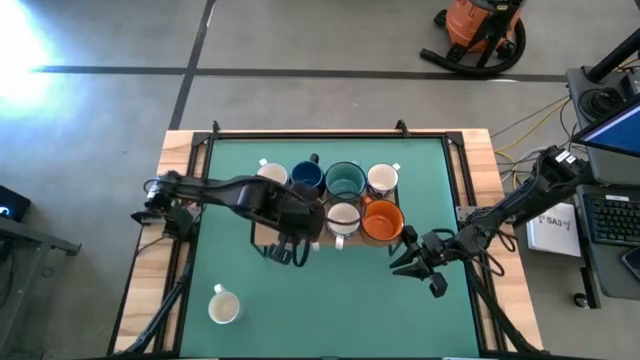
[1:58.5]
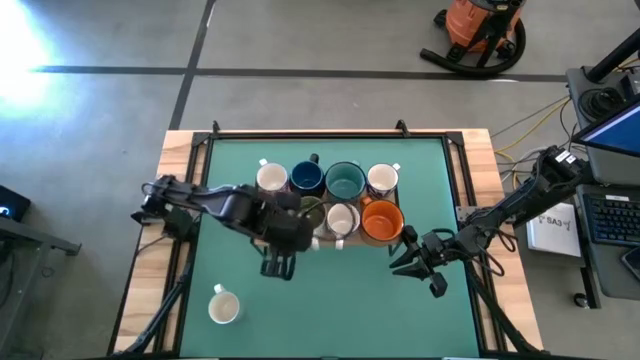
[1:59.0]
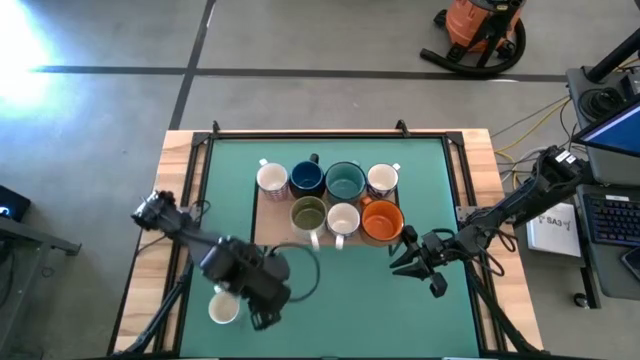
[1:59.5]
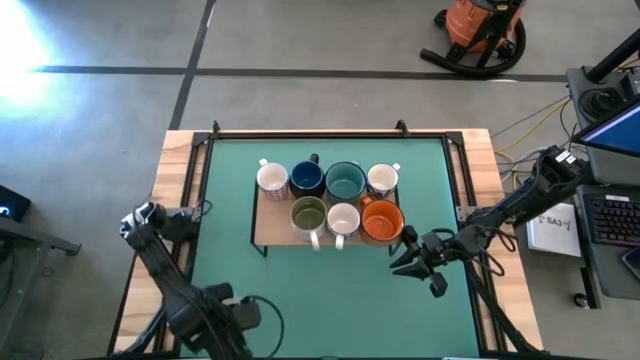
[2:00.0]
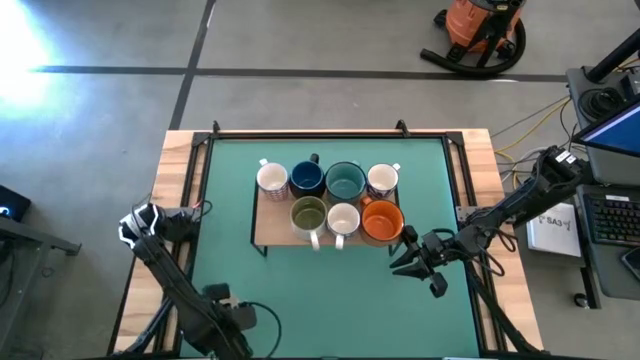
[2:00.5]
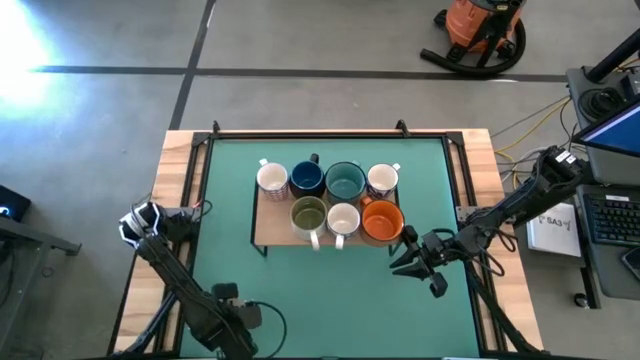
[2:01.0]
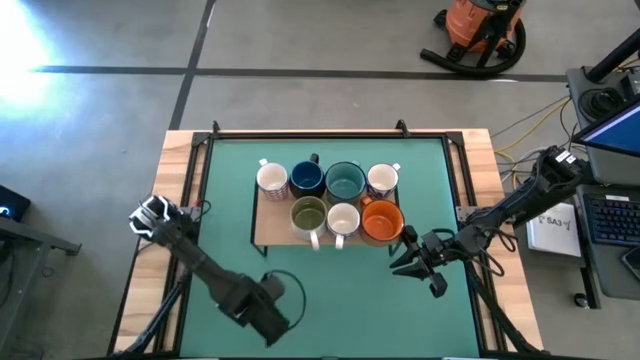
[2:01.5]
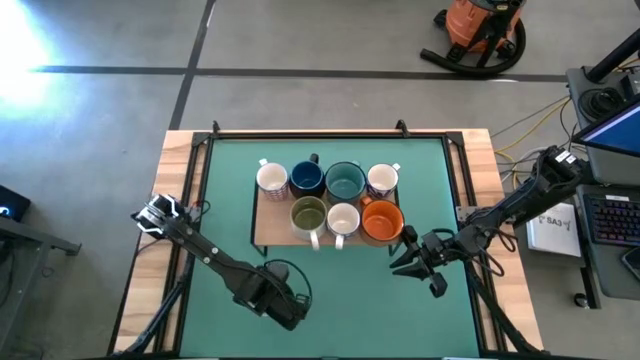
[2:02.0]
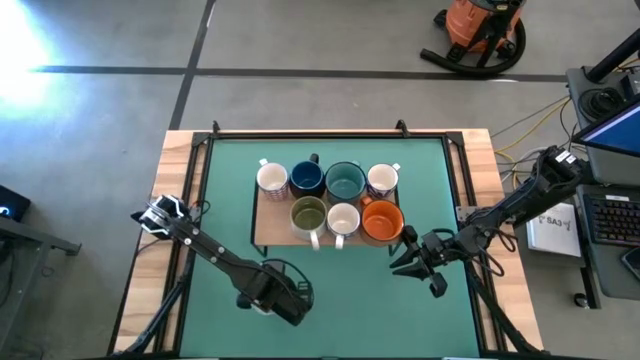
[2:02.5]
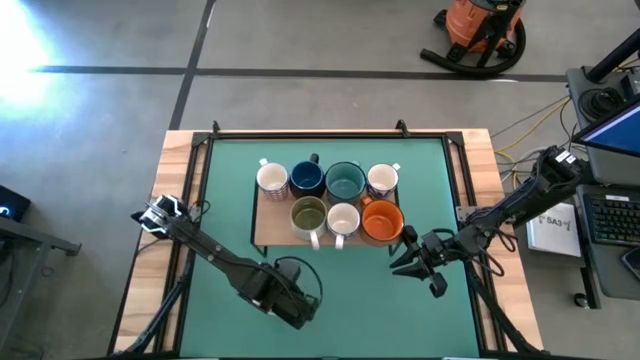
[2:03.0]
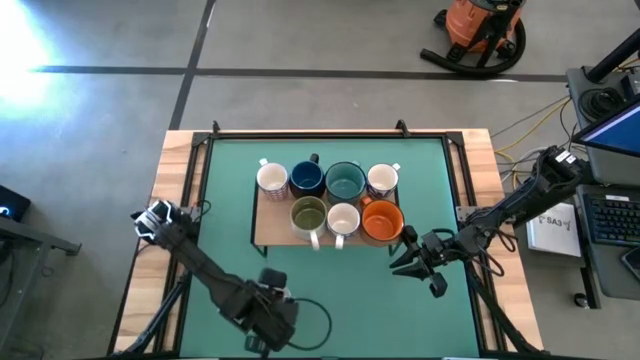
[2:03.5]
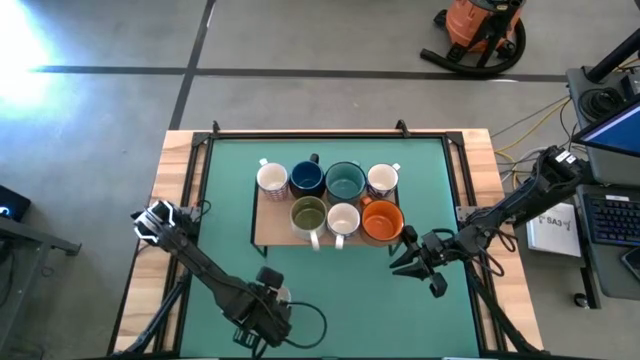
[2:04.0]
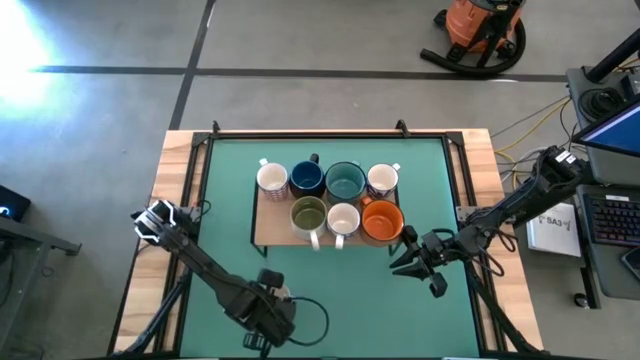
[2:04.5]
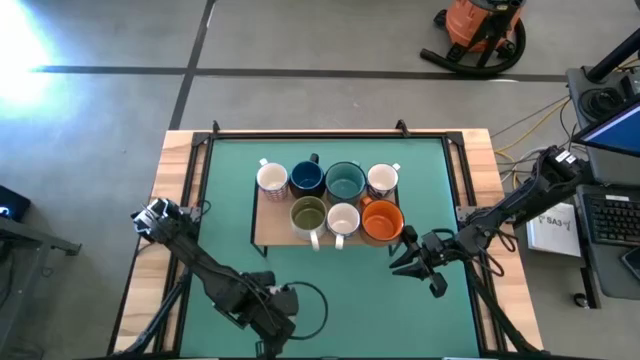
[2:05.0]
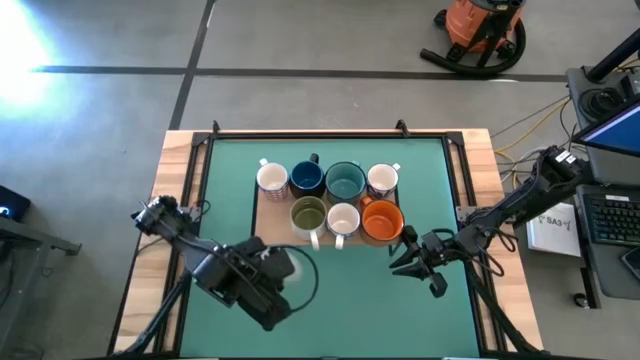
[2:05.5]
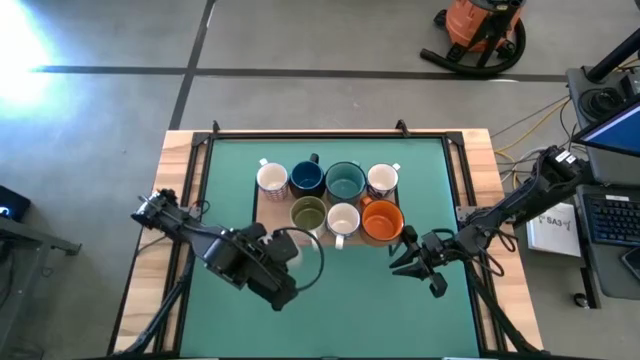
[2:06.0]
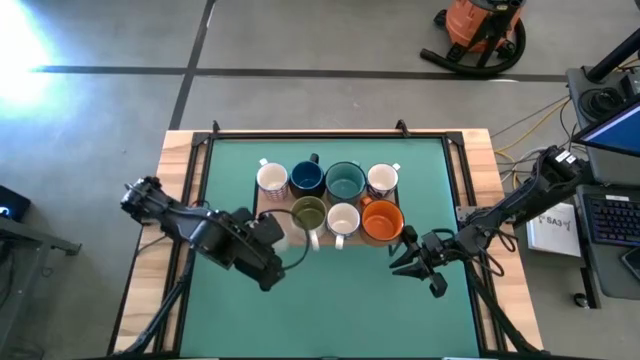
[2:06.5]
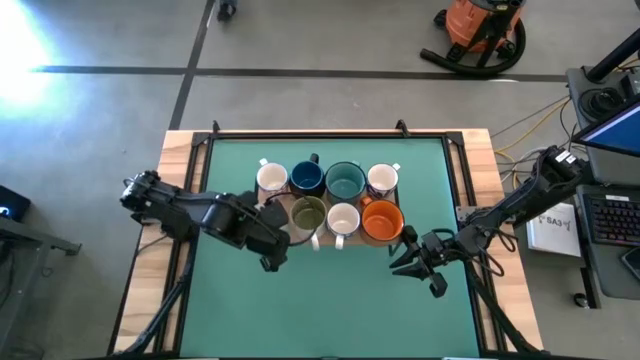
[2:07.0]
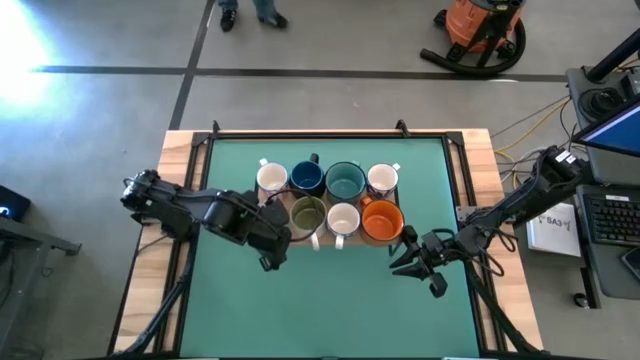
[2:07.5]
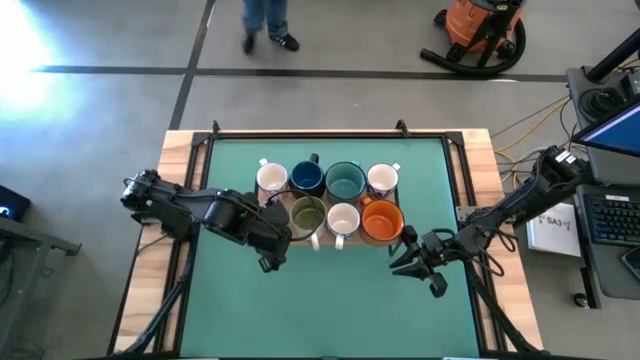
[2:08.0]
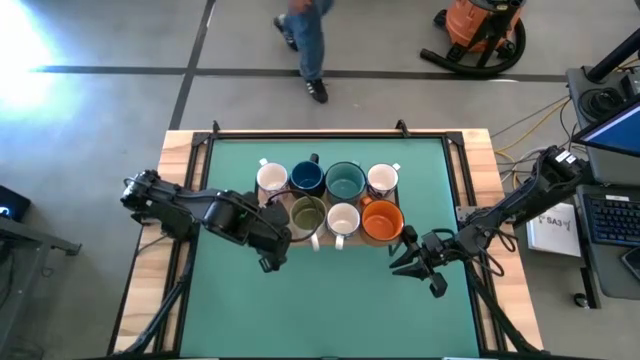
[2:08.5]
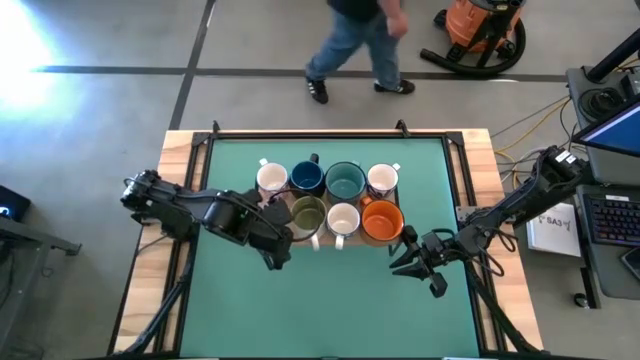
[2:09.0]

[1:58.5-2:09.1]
Task: Place coffee mugs
Put the white green patterned mug on the shelf

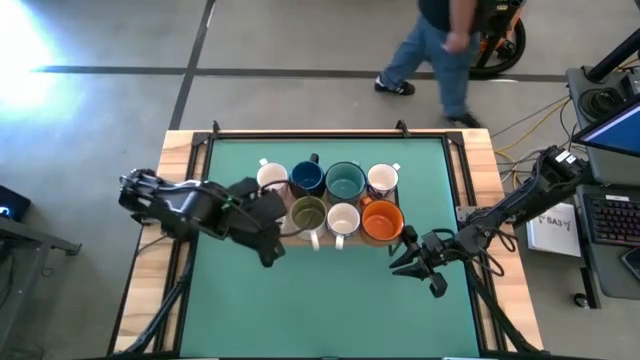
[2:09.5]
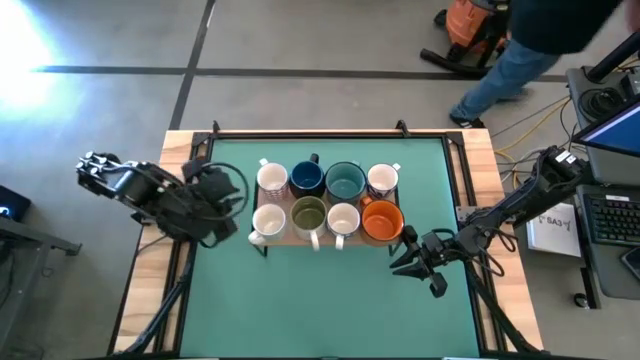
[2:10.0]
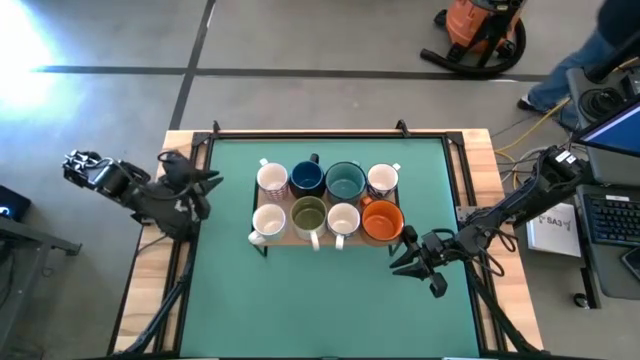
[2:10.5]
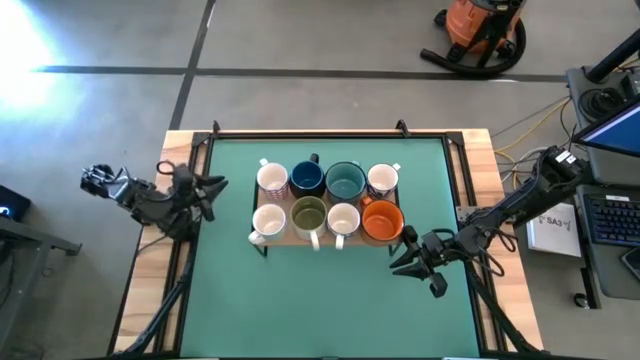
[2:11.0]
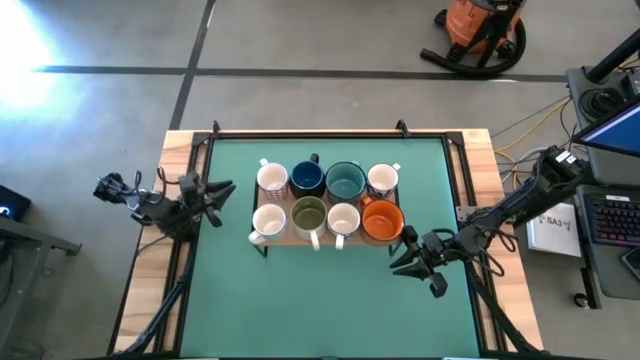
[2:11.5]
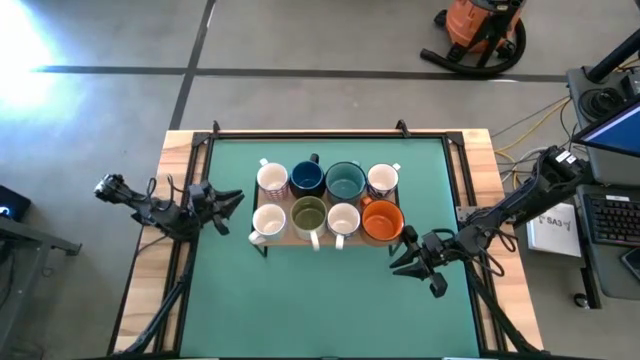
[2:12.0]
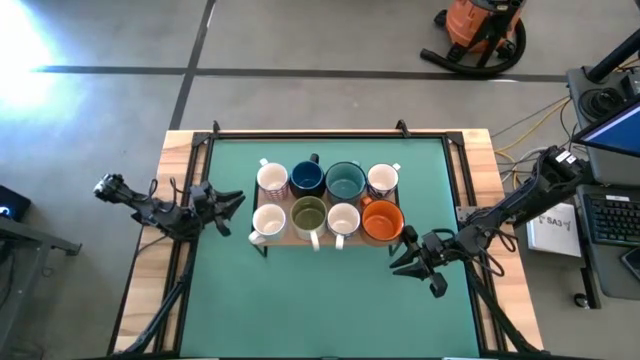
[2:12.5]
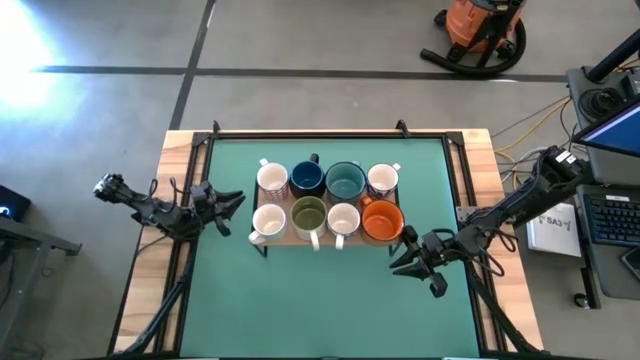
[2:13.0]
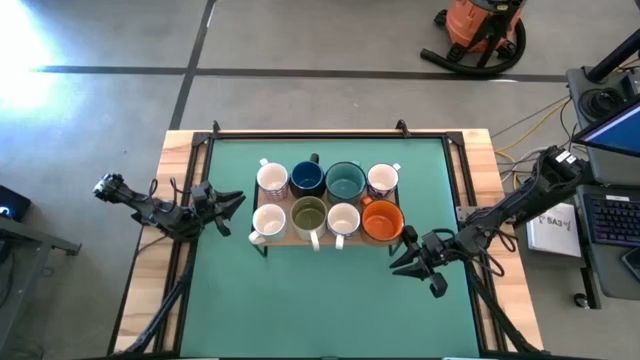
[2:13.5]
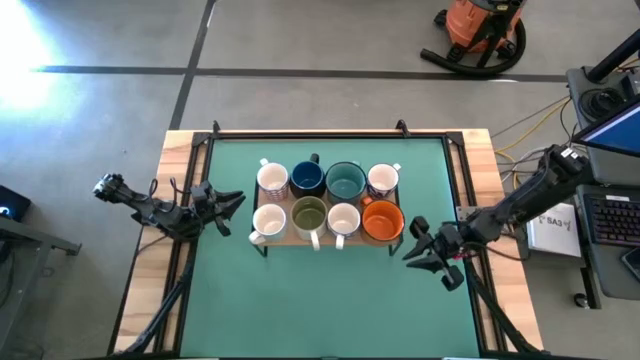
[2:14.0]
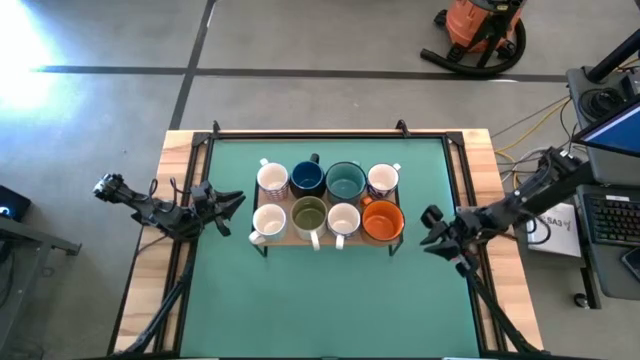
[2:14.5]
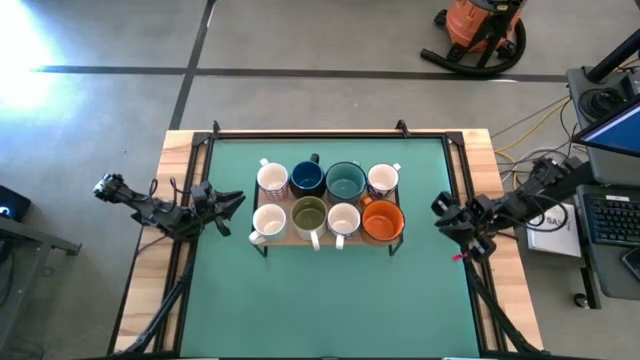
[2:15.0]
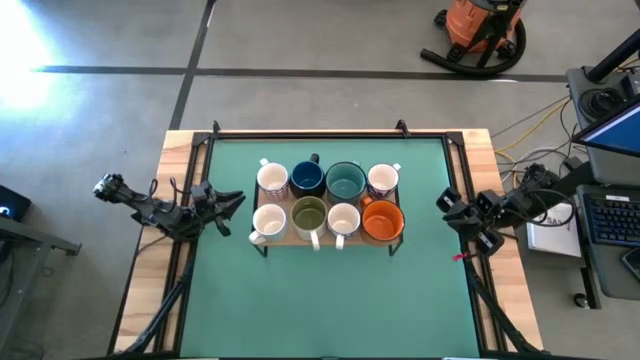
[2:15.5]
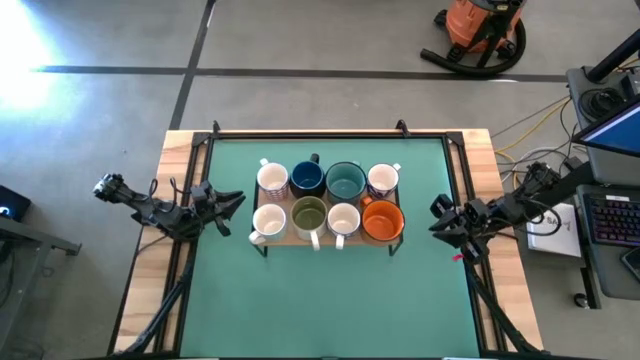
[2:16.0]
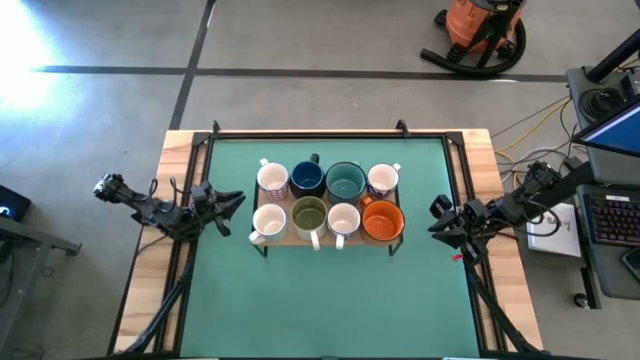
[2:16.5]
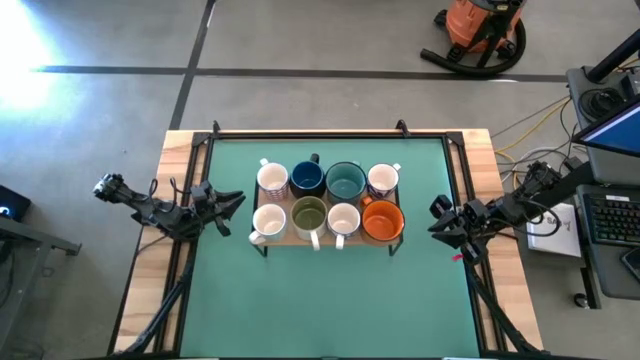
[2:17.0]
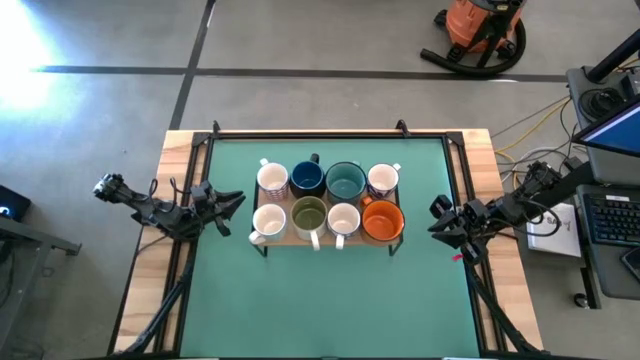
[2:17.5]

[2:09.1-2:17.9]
Return to Home Position

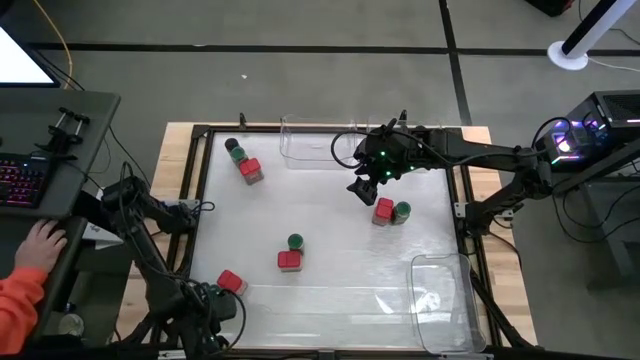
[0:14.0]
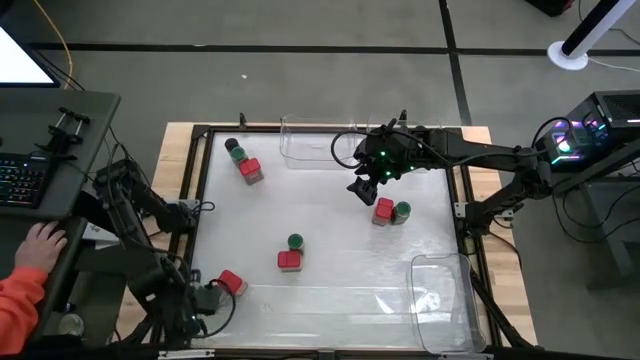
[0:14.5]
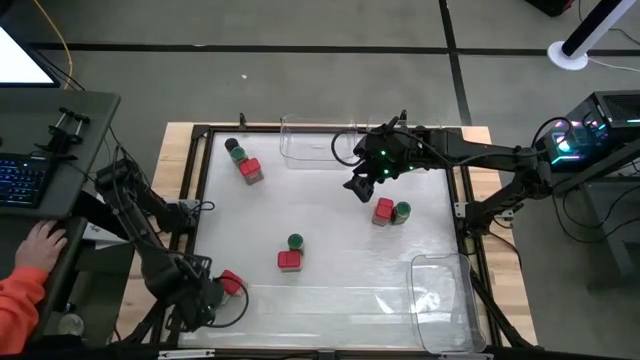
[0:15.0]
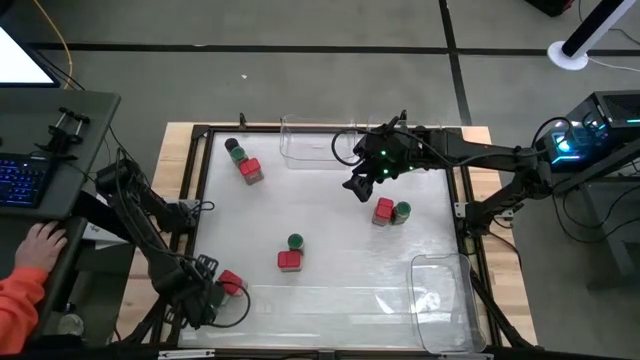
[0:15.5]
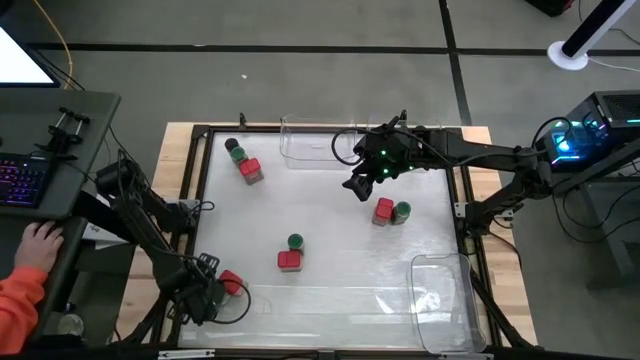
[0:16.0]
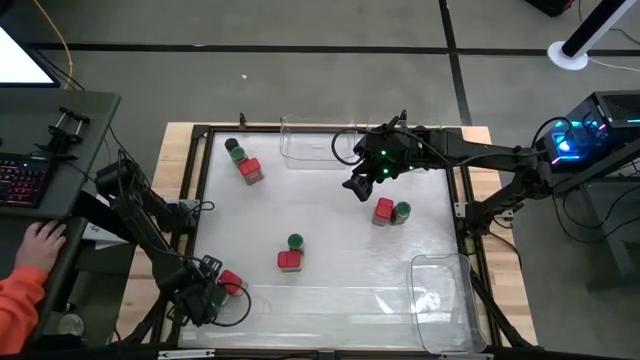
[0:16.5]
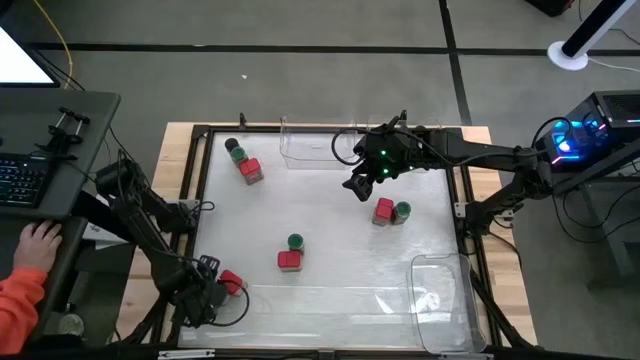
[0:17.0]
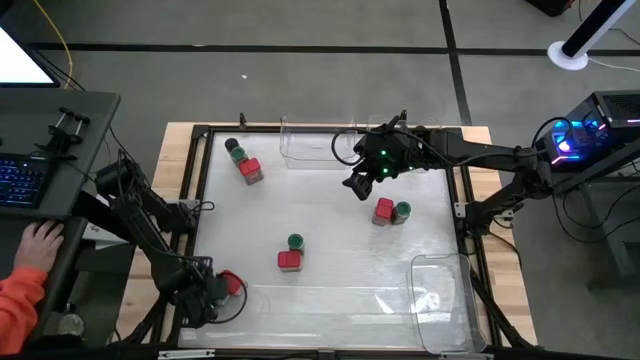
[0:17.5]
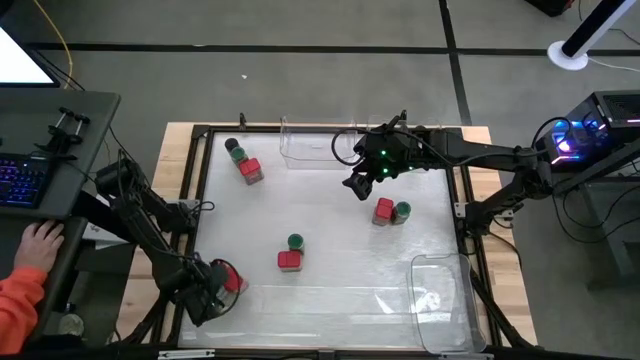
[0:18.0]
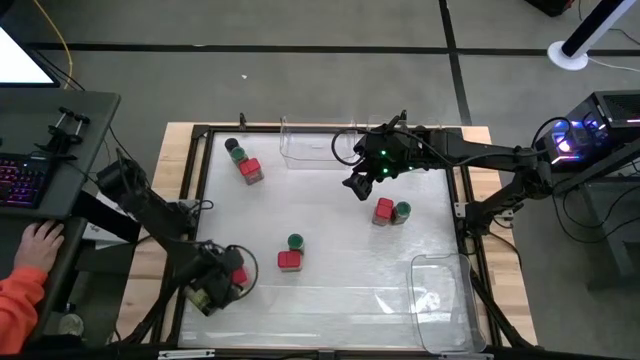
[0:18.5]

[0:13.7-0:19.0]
Task: Sort spices by type
Adjust the green seasoning bottle and red seasoning can on the table
